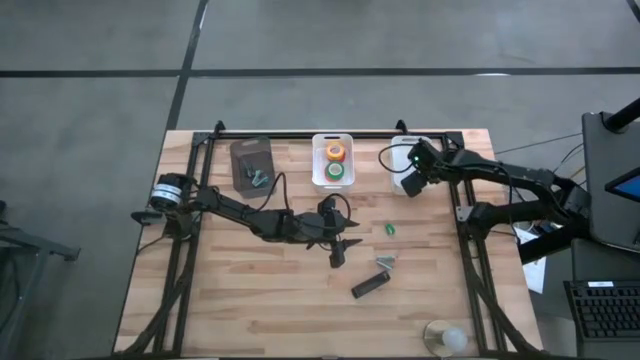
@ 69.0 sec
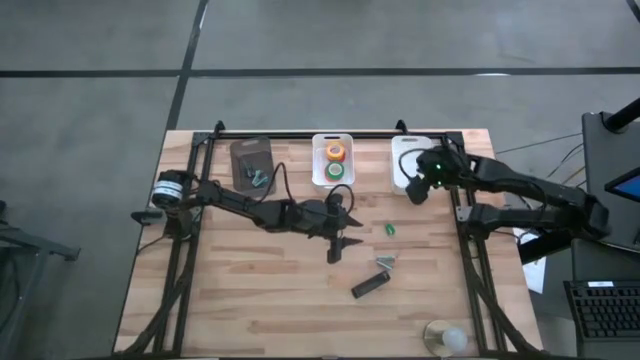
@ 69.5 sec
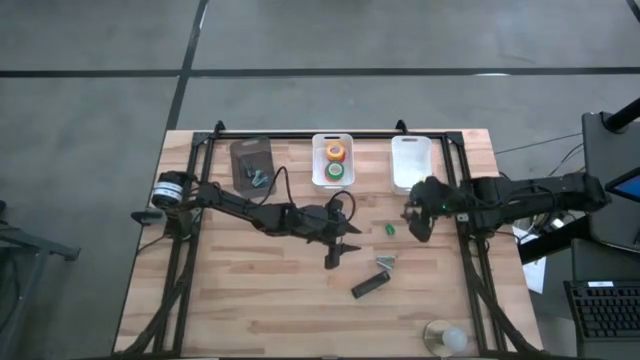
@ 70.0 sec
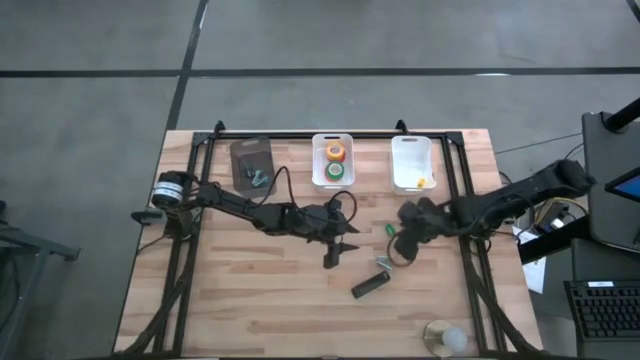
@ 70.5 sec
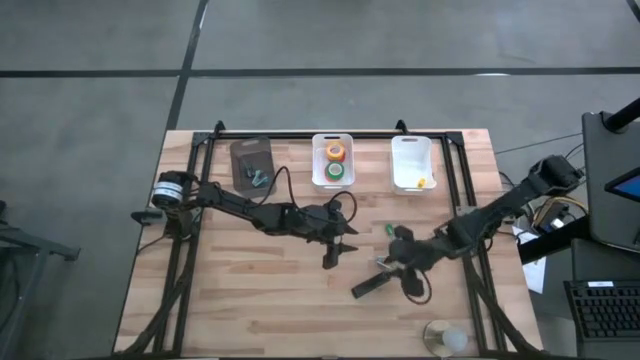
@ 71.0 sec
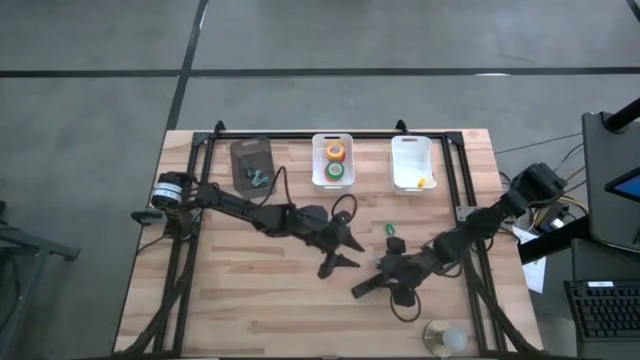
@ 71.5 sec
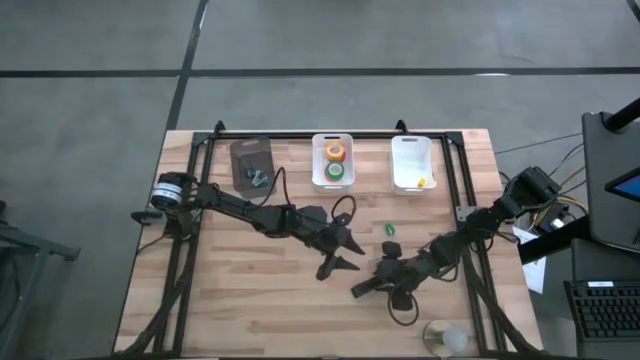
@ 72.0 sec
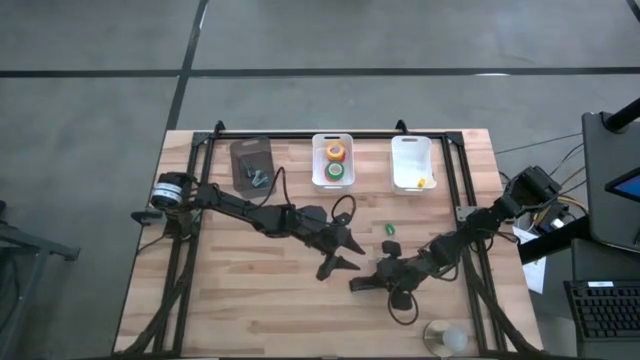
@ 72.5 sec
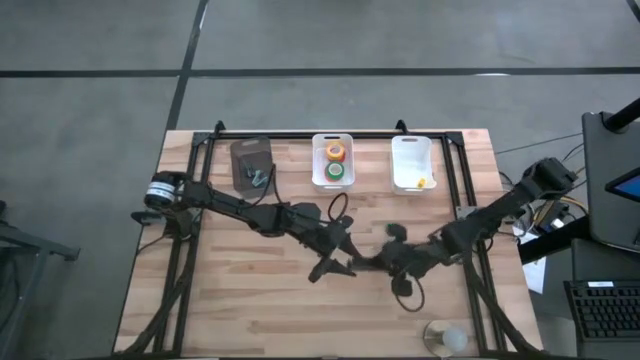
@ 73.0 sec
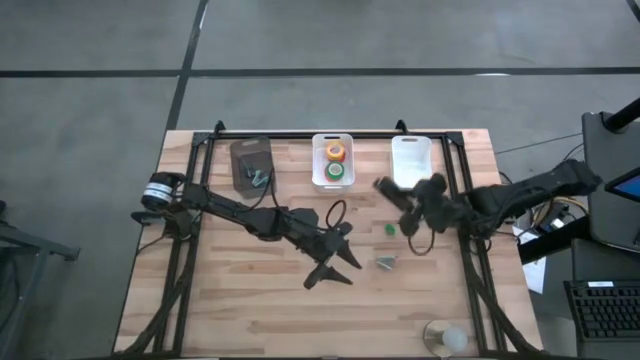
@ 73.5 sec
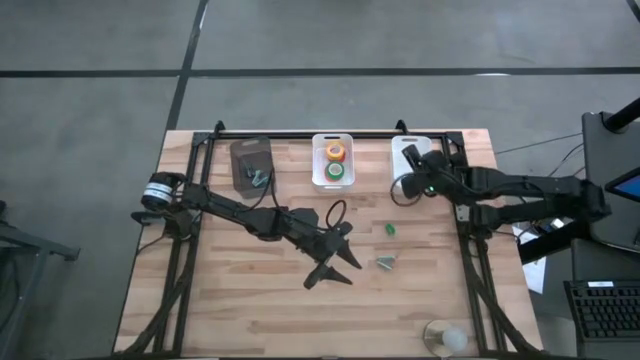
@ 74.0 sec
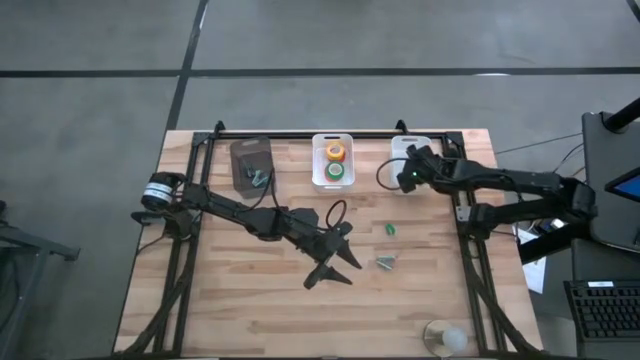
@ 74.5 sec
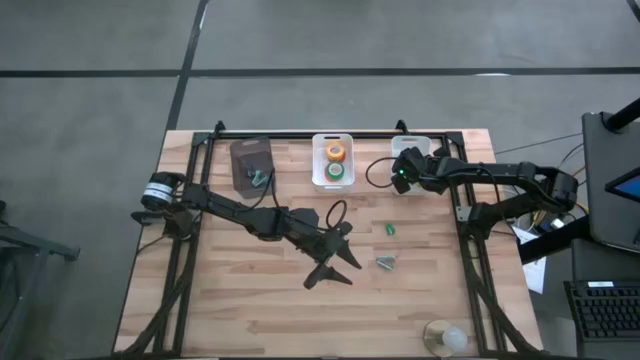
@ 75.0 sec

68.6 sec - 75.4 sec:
Task: Pick and place Stapler, Stapler remover, tape
Put the black stapler into the right white bin

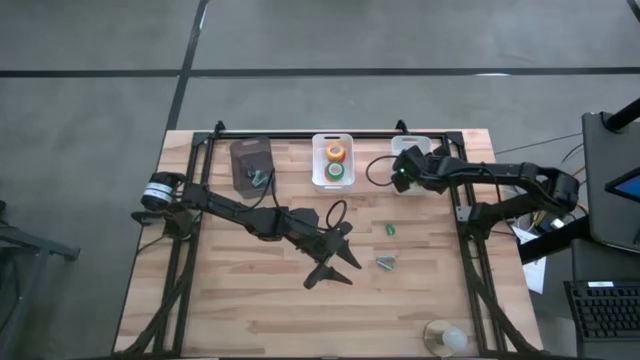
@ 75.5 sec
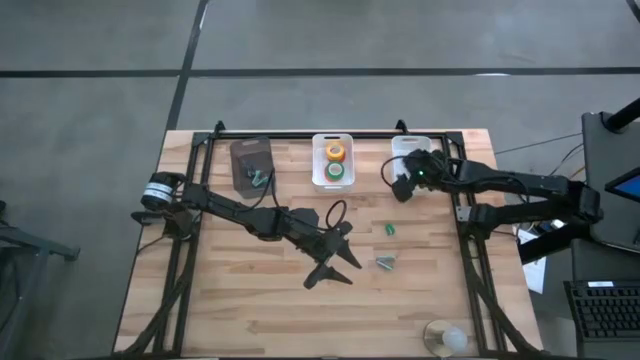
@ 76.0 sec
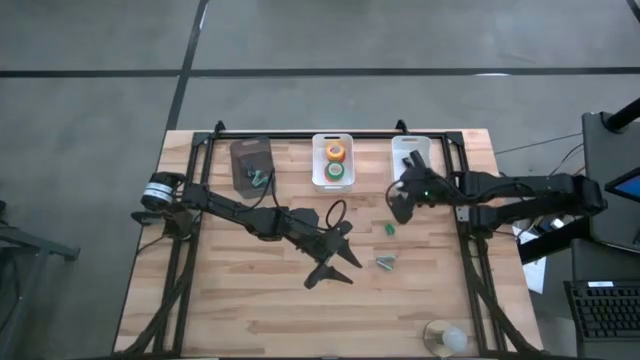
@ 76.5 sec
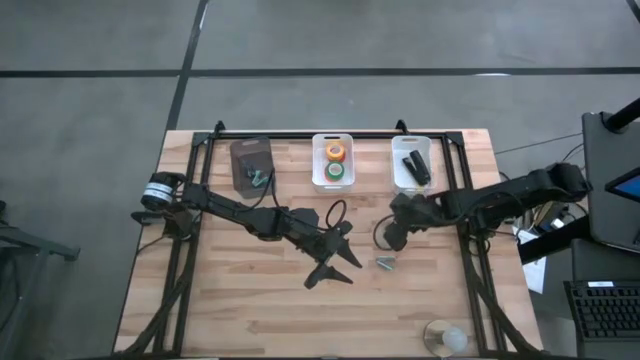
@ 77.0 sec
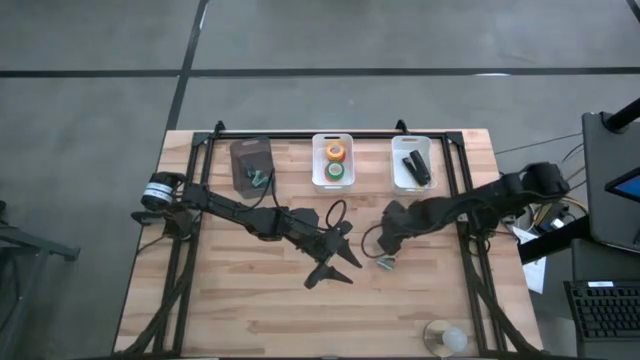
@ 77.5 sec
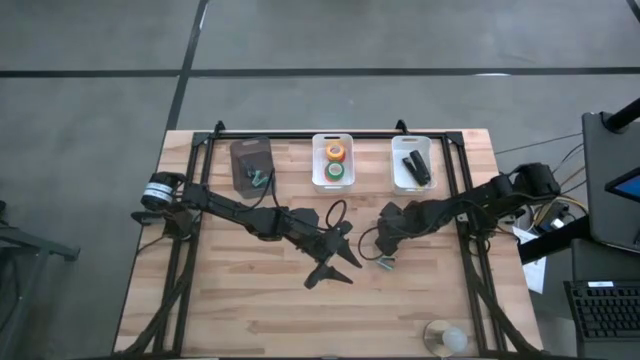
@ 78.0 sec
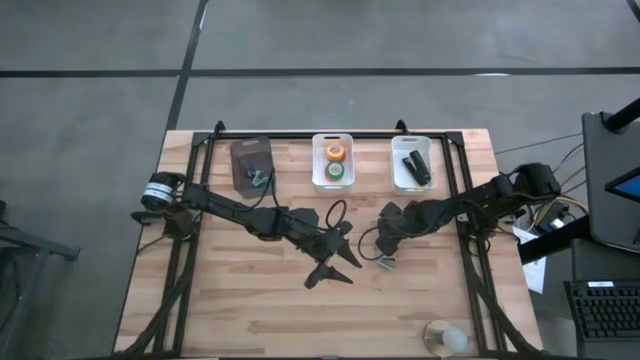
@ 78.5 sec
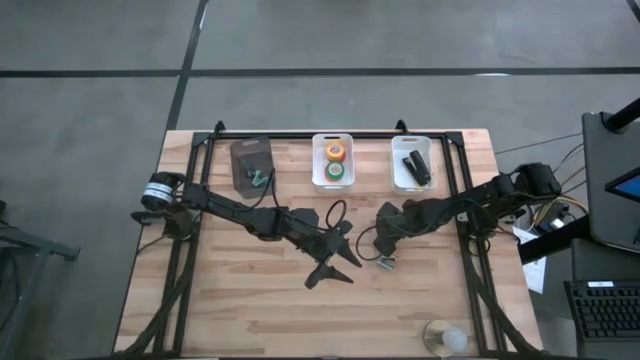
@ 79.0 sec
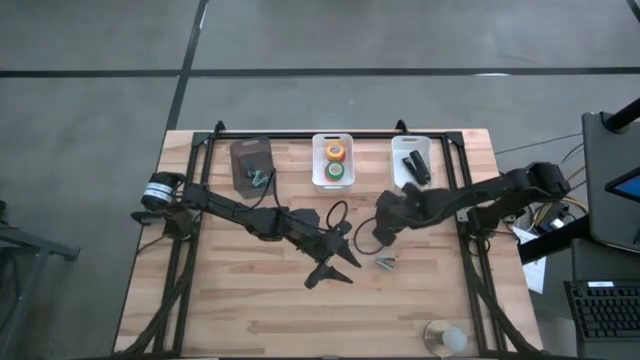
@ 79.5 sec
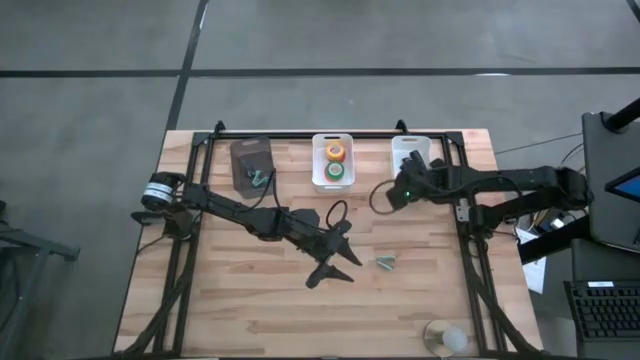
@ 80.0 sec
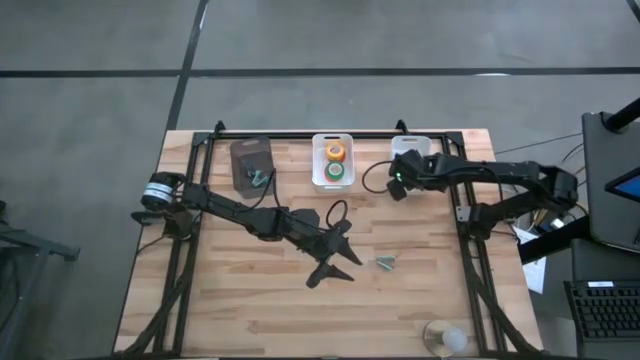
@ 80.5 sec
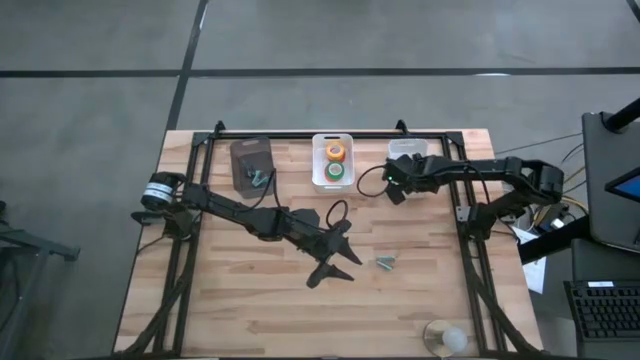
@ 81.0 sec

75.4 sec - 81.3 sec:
Put the green stapler into the right white bin

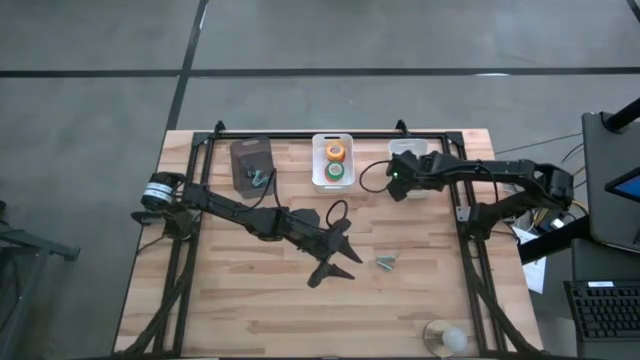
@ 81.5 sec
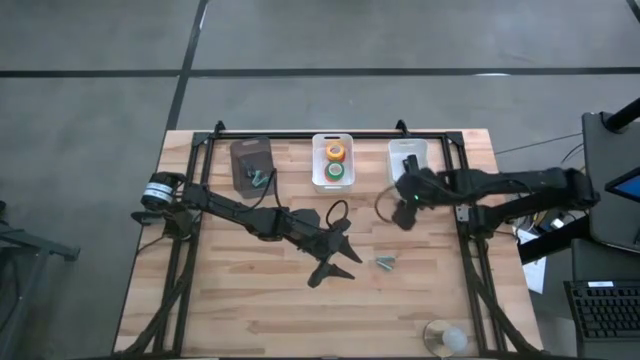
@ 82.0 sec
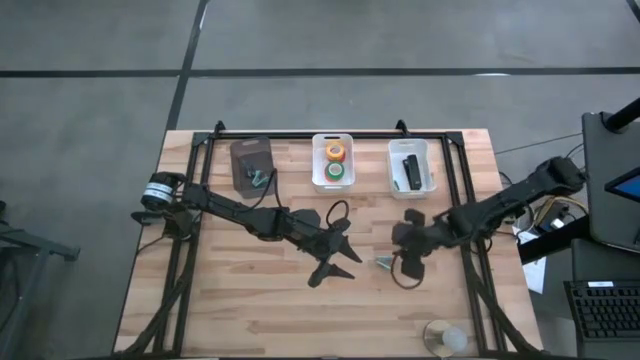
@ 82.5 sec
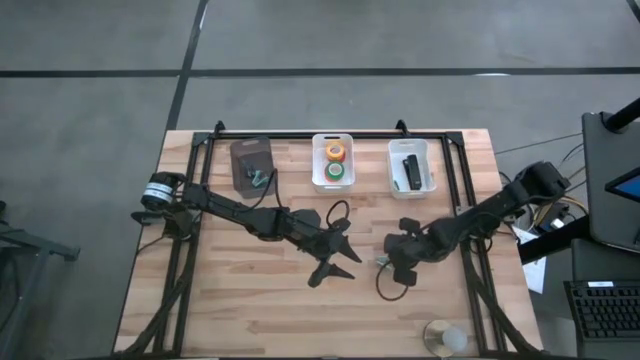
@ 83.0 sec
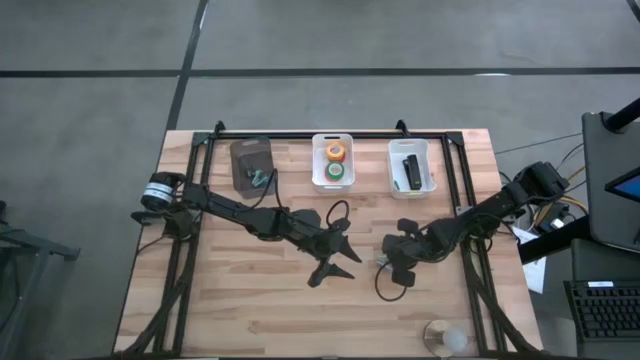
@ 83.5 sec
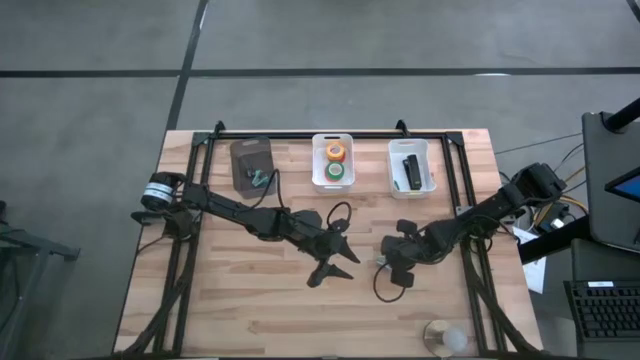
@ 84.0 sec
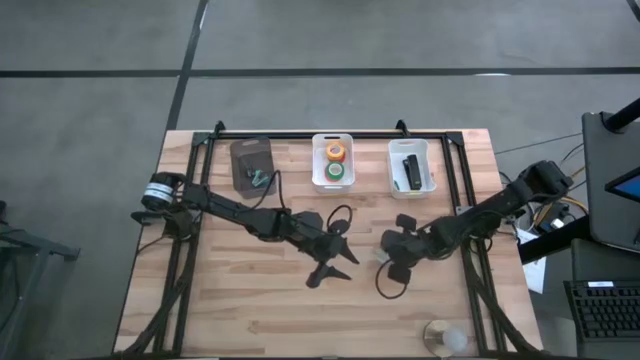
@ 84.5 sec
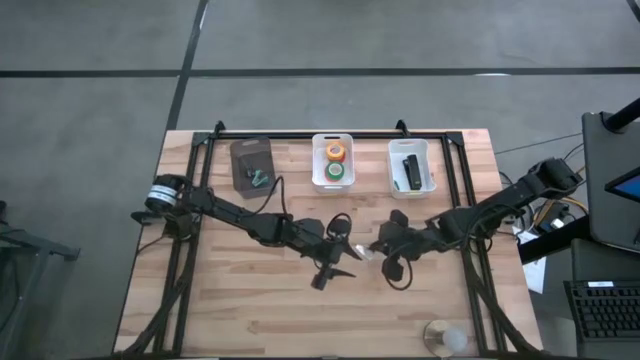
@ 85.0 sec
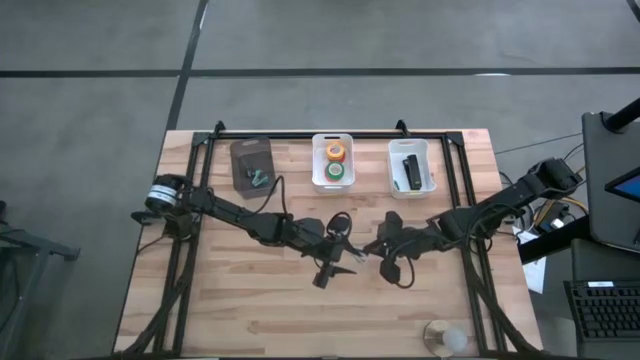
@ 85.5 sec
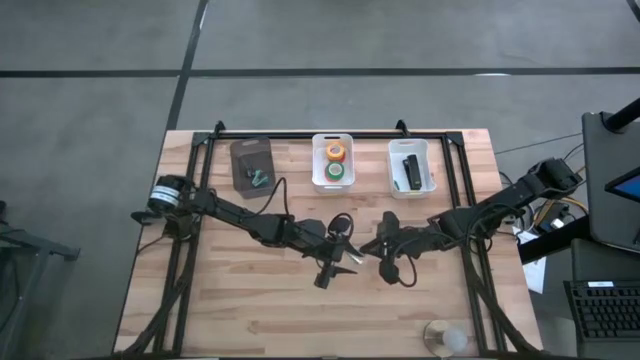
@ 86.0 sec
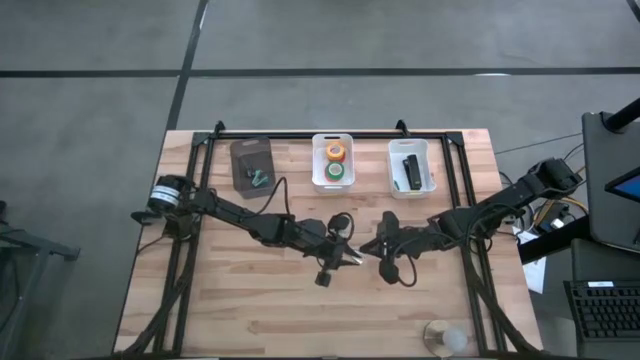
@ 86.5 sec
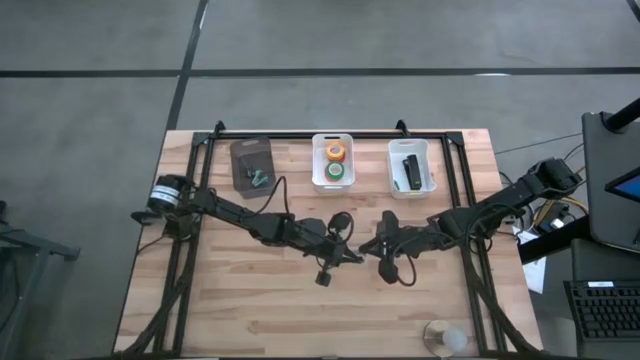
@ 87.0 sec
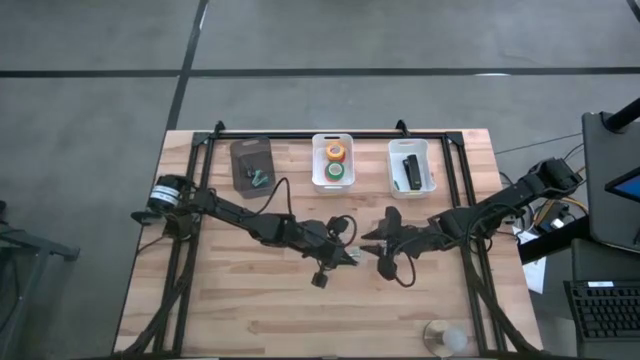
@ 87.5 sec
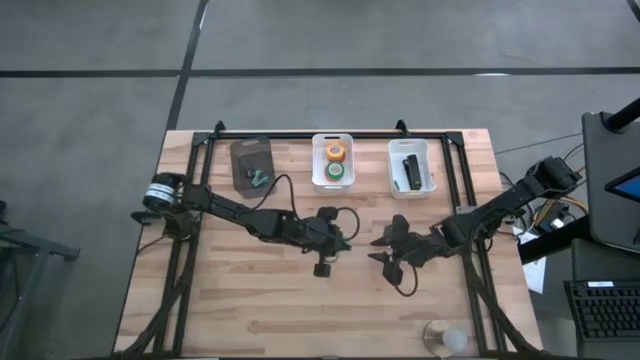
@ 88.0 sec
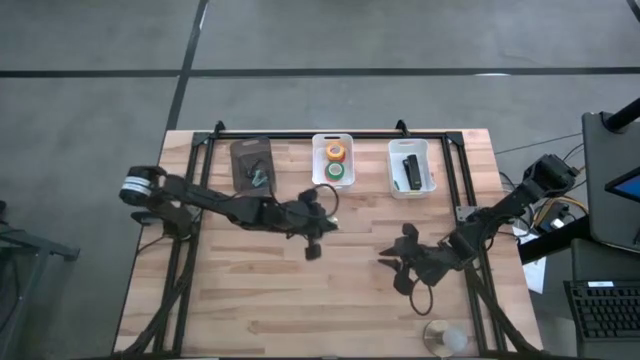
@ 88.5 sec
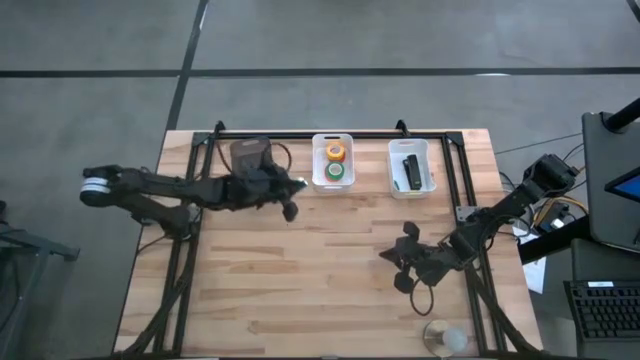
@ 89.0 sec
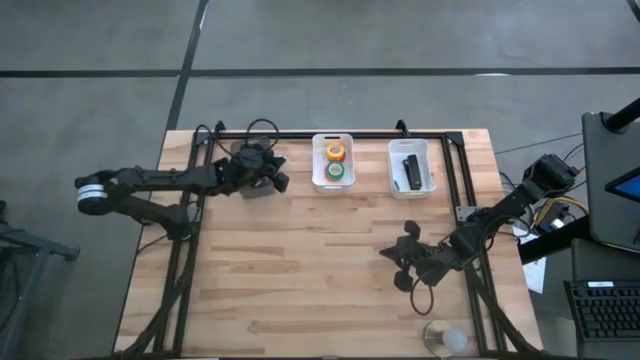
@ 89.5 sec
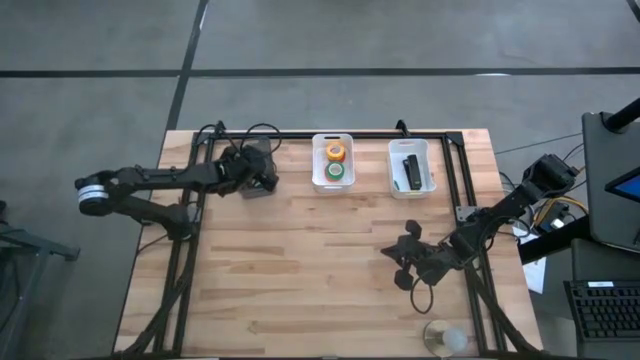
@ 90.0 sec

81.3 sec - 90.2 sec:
Put the light blue staple remover into the black bin
